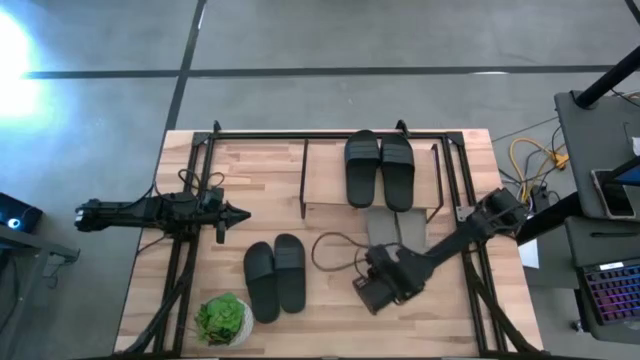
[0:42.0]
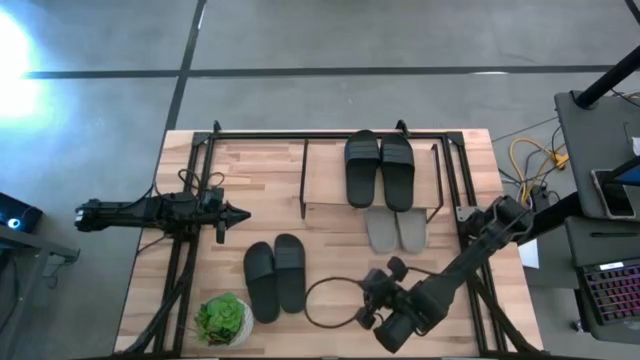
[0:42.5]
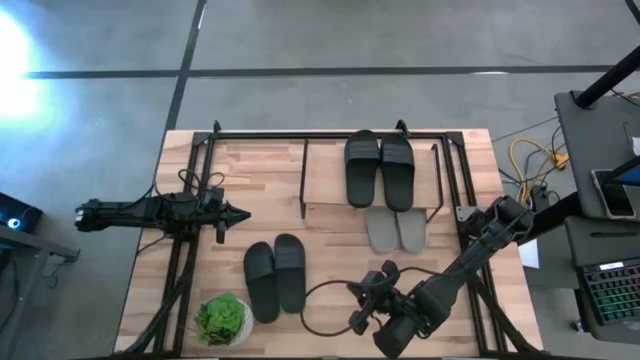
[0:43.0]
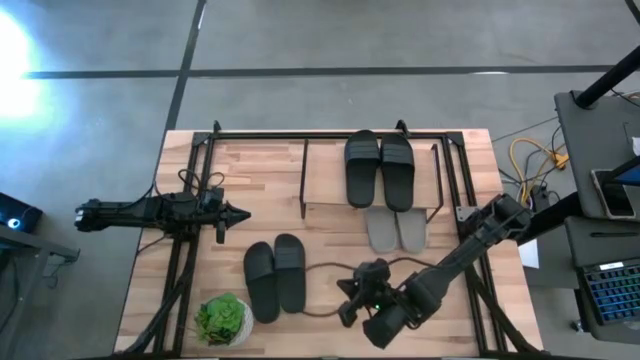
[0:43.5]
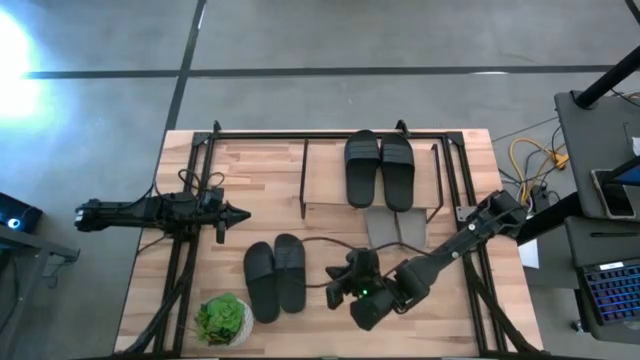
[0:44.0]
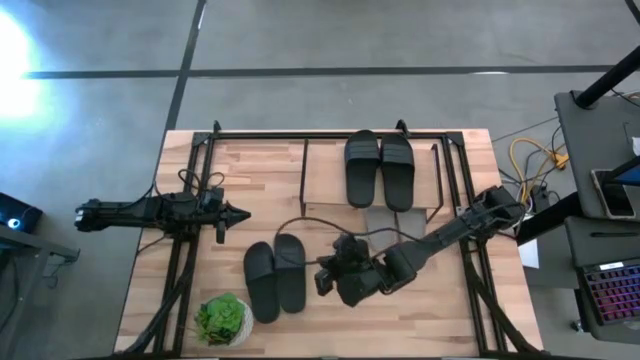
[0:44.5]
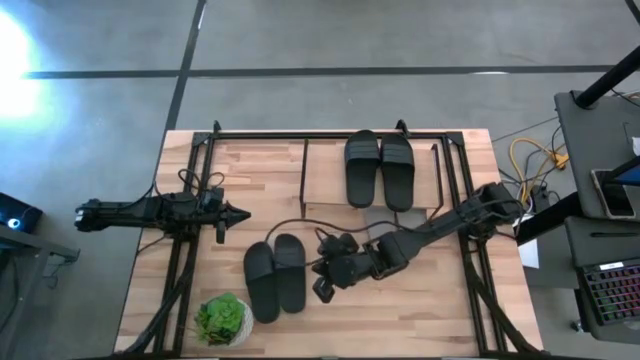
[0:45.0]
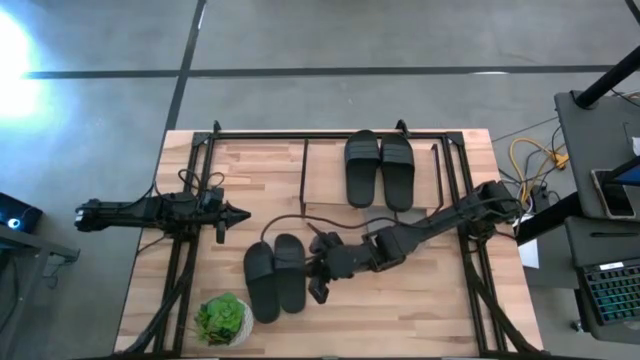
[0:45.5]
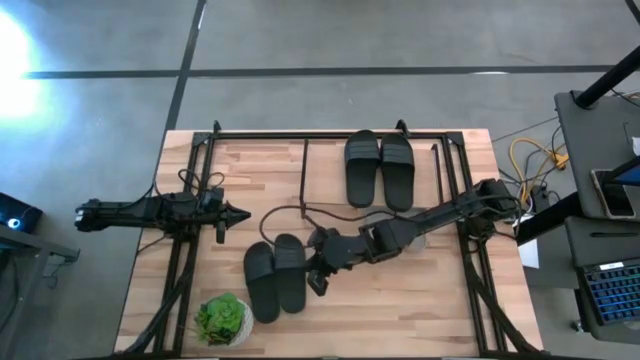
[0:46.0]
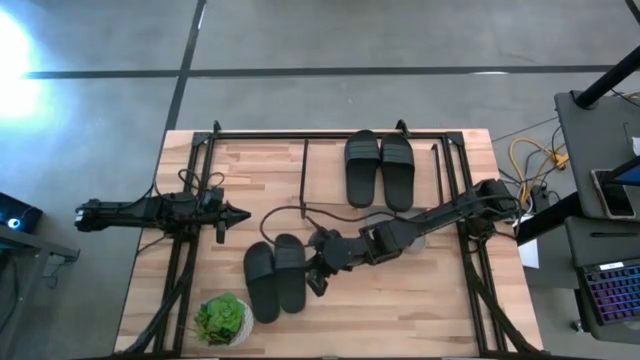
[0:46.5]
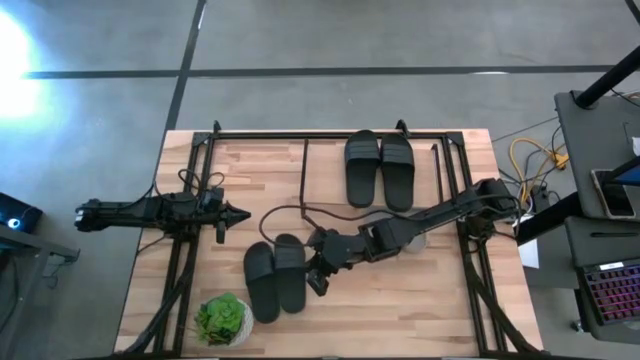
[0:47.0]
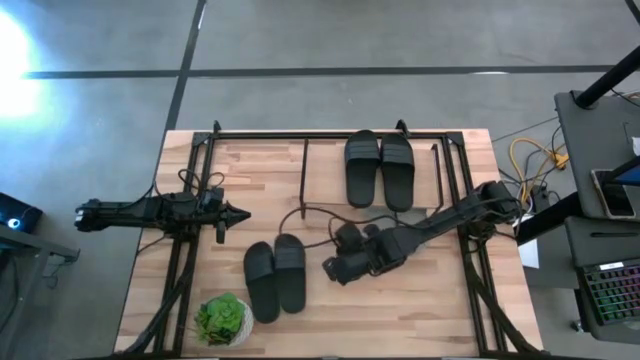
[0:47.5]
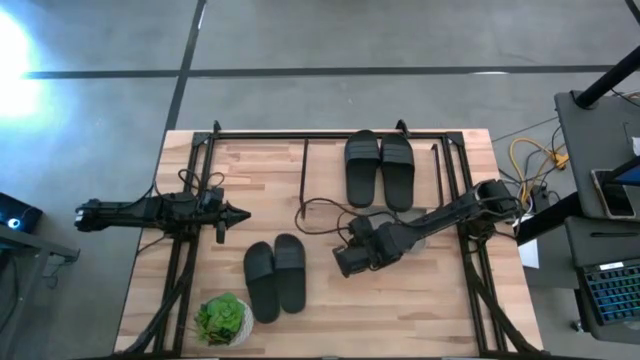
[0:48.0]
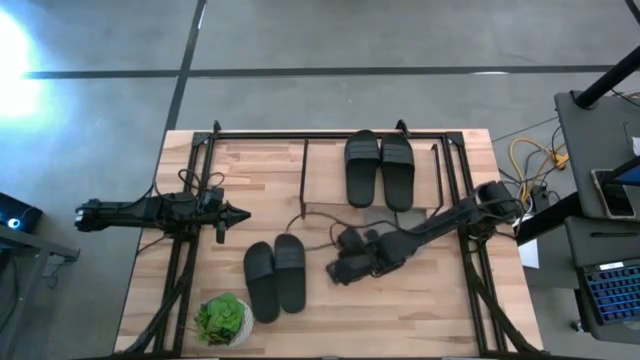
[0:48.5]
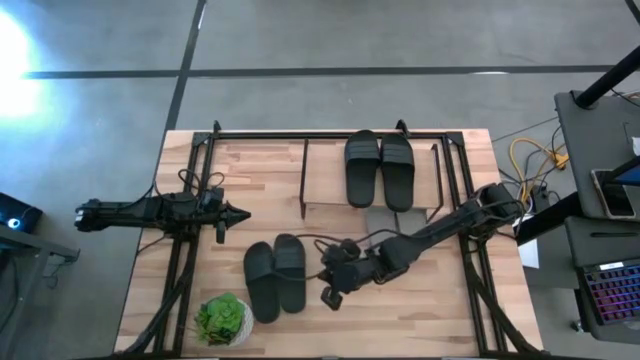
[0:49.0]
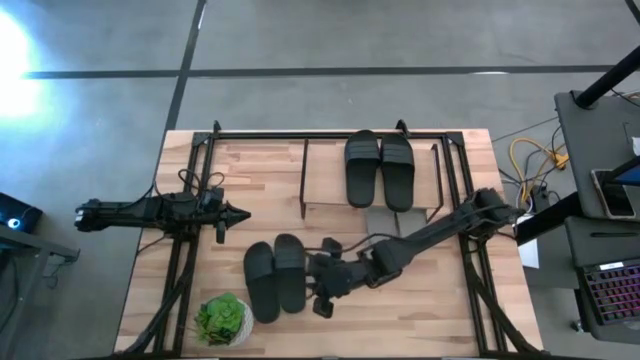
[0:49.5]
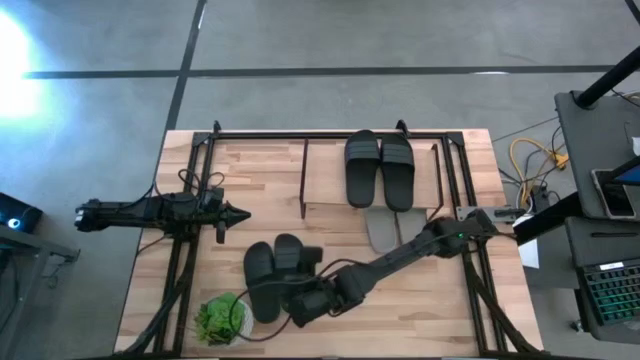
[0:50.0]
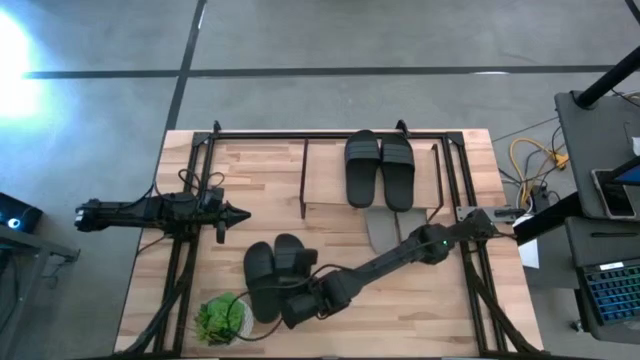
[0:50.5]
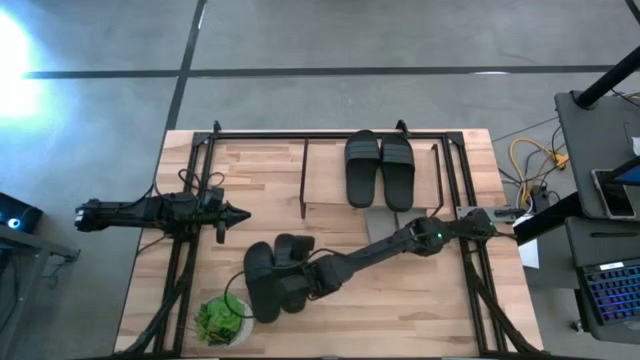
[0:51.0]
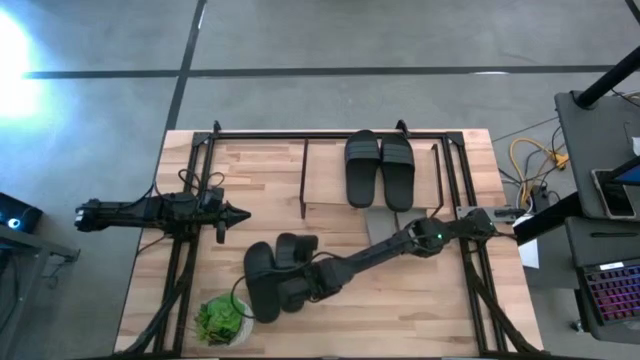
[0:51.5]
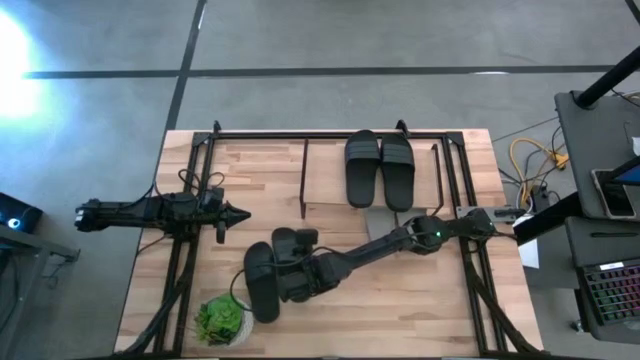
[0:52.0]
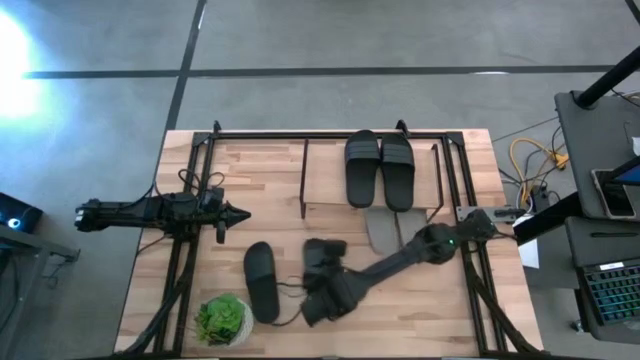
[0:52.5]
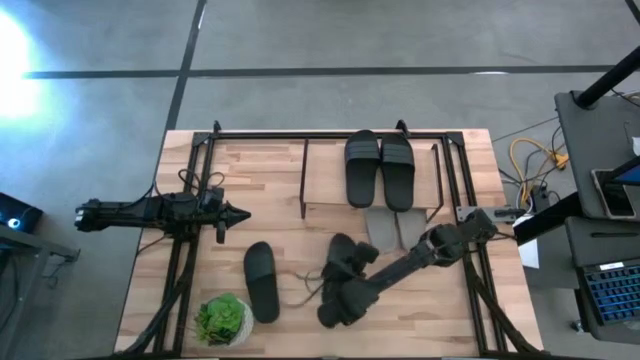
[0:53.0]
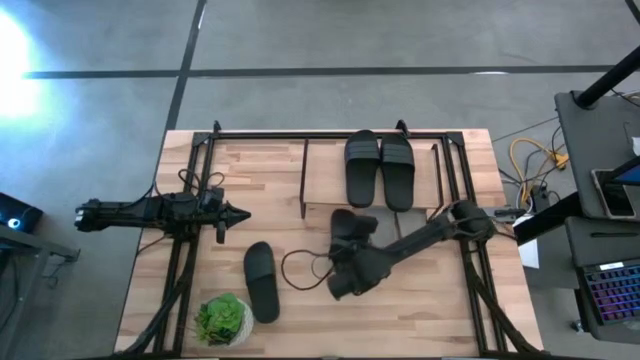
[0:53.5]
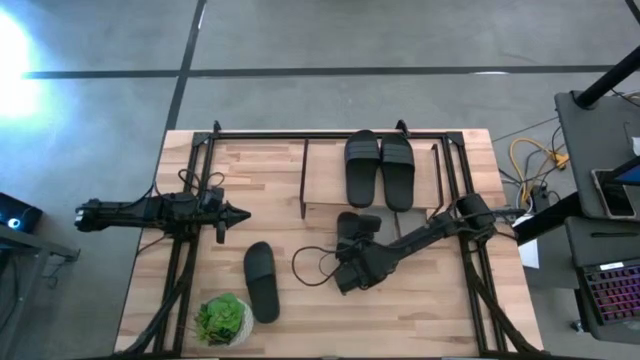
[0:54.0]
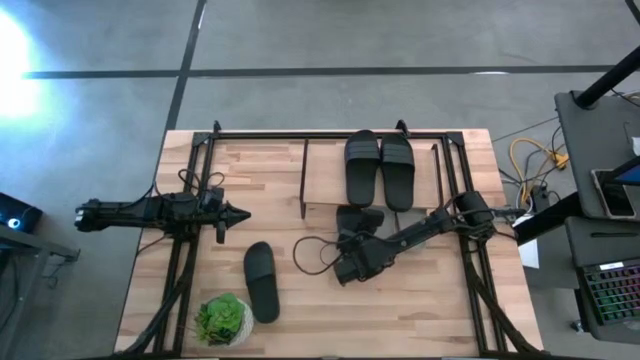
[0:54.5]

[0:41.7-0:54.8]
Task: Pick and place slides into the shelf
Put the black slide under the shelf

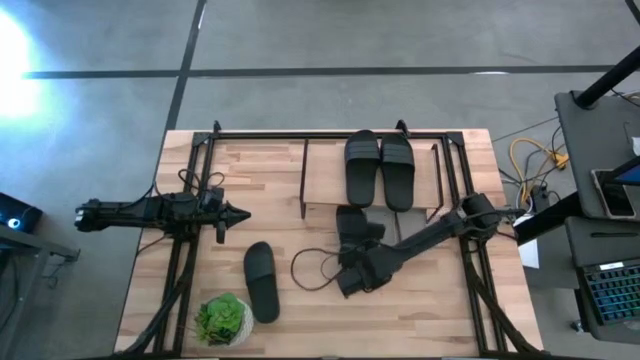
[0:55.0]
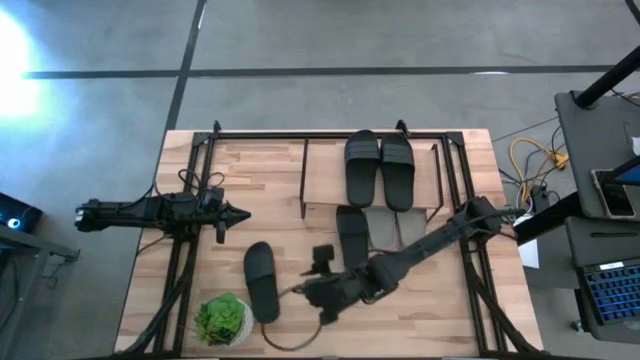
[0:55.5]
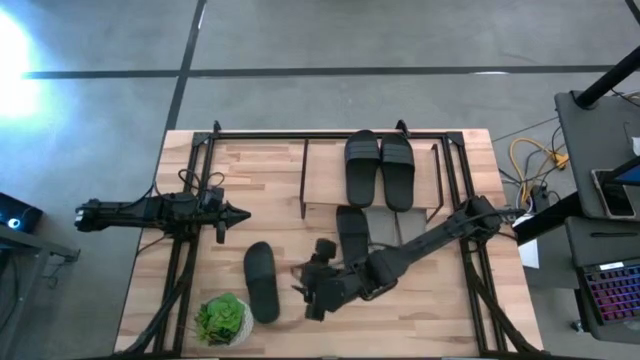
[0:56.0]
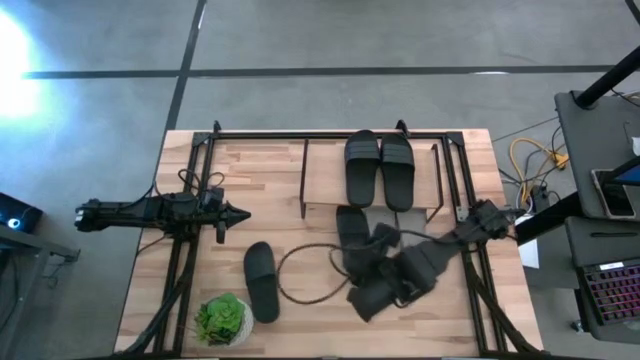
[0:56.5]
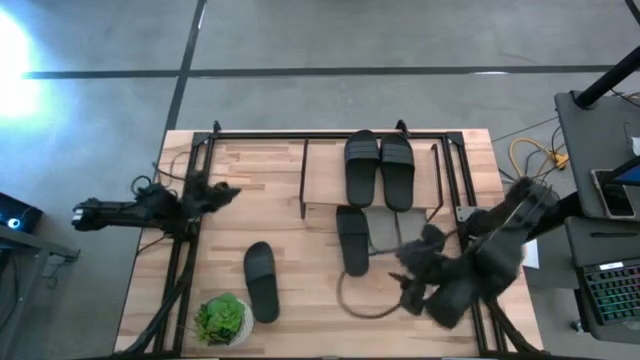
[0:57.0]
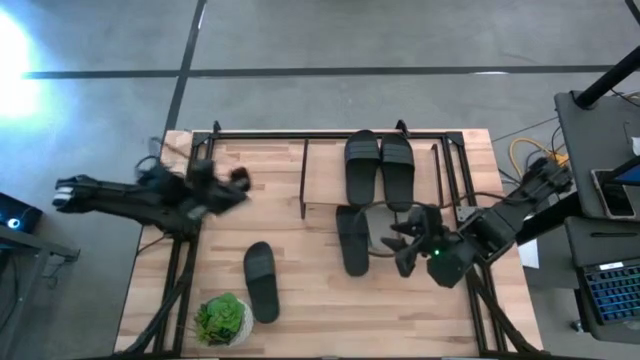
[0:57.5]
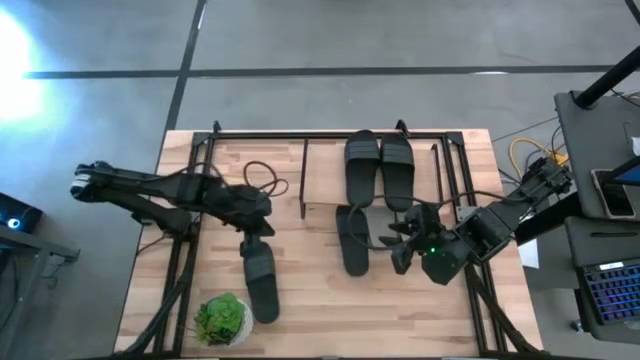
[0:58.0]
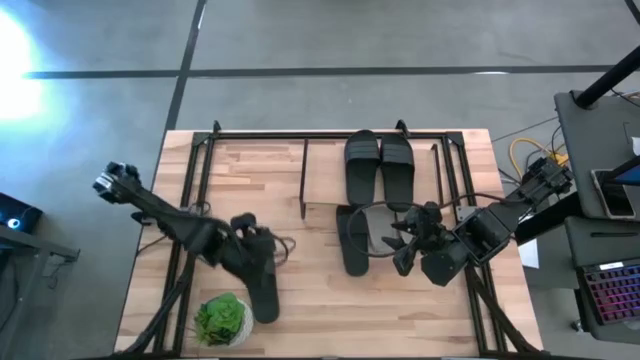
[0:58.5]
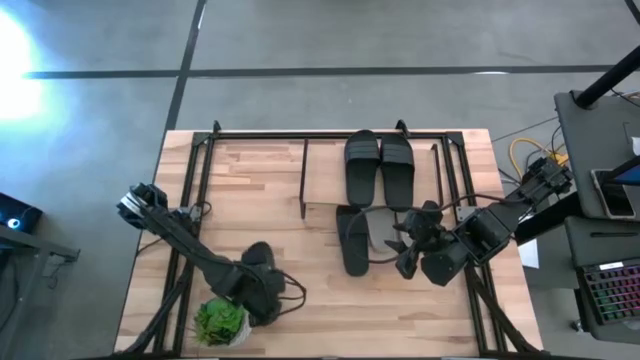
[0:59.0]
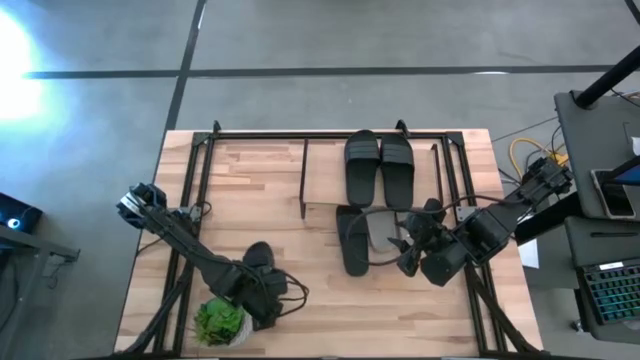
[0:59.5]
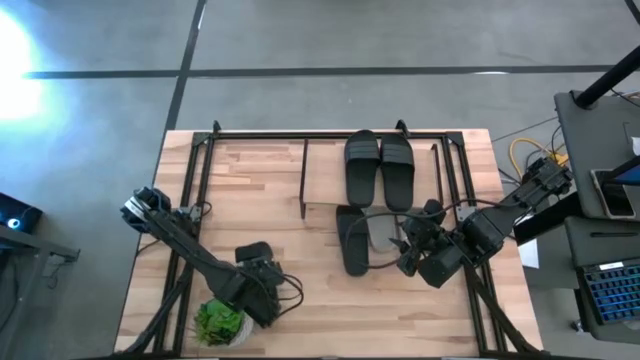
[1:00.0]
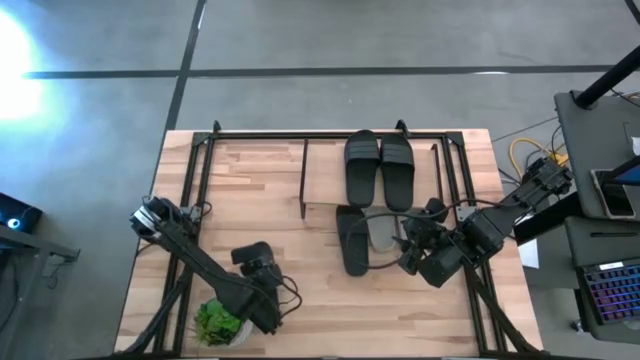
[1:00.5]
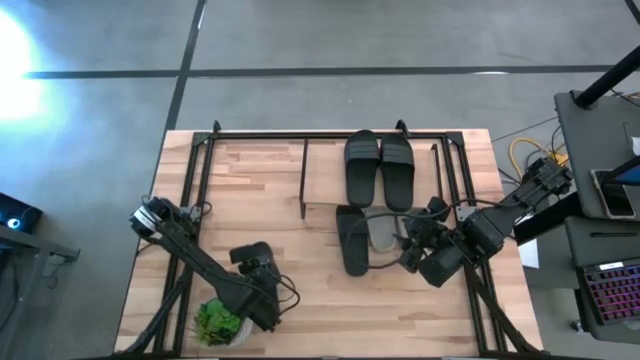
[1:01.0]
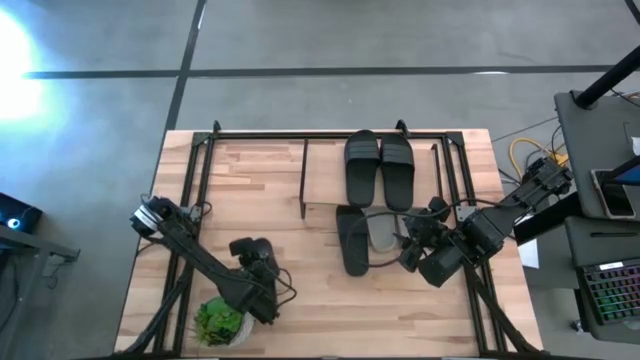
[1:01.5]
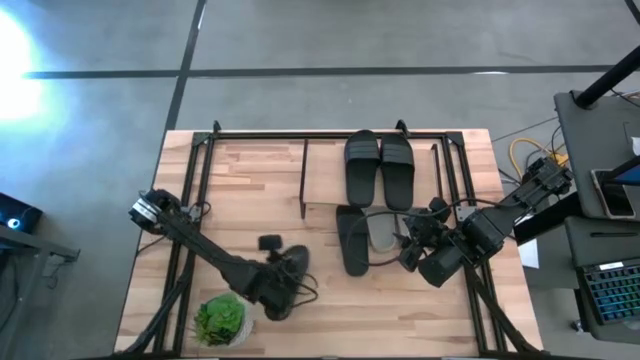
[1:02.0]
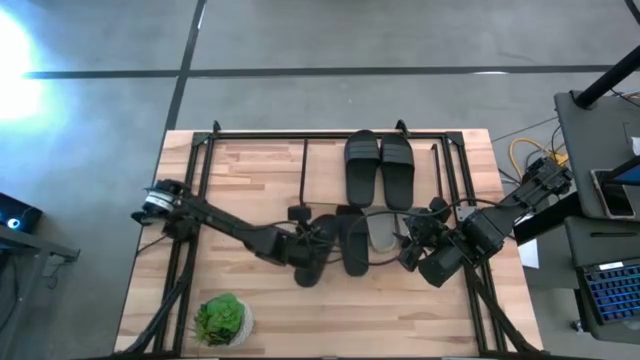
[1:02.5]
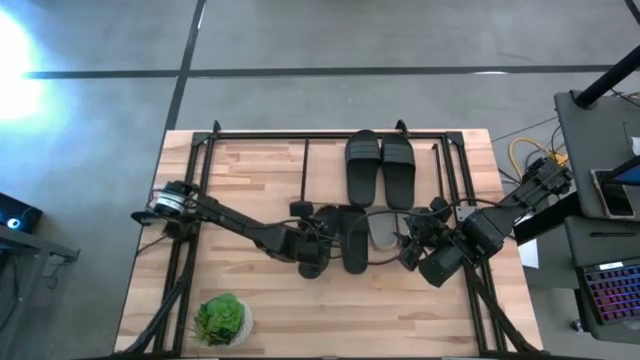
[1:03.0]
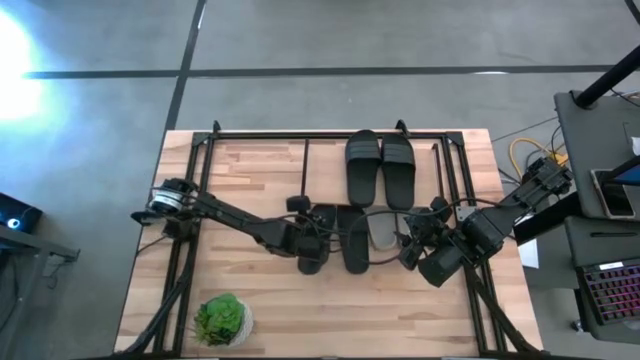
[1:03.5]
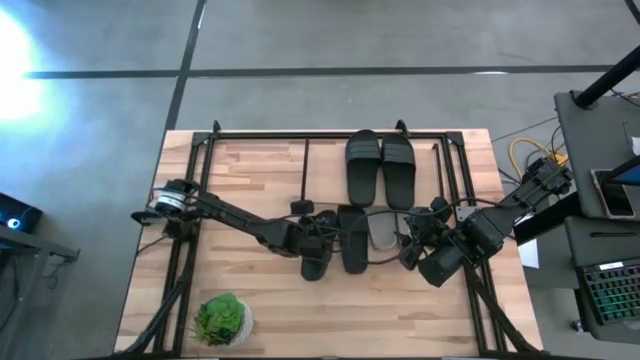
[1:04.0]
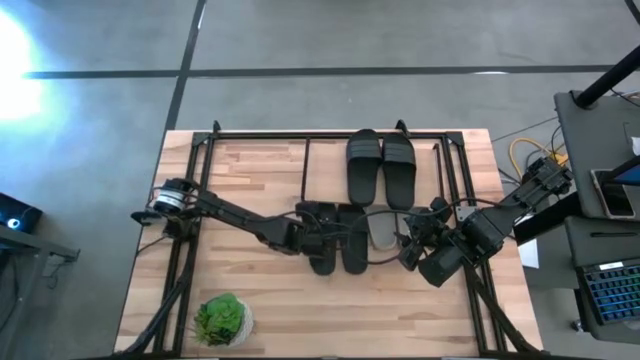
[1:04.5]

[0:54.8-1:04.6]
Put the black slide under the shelf
